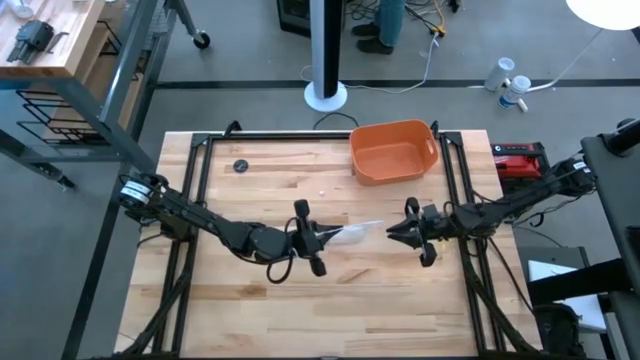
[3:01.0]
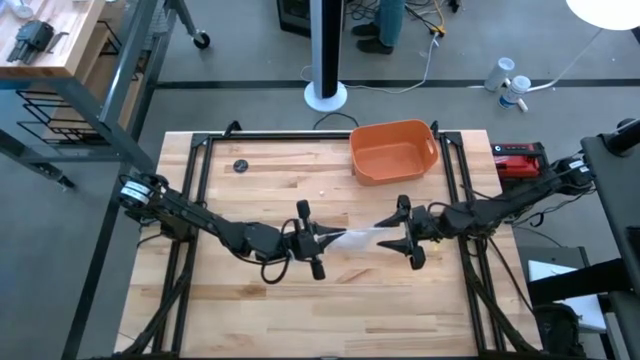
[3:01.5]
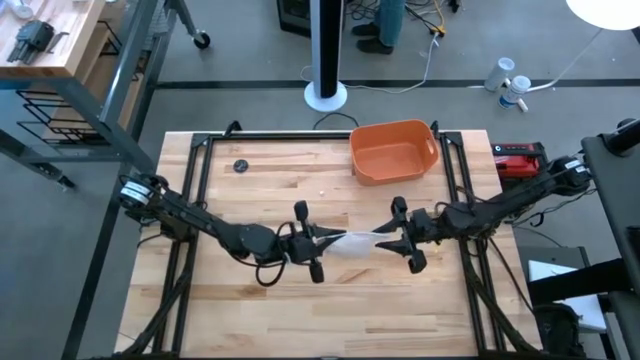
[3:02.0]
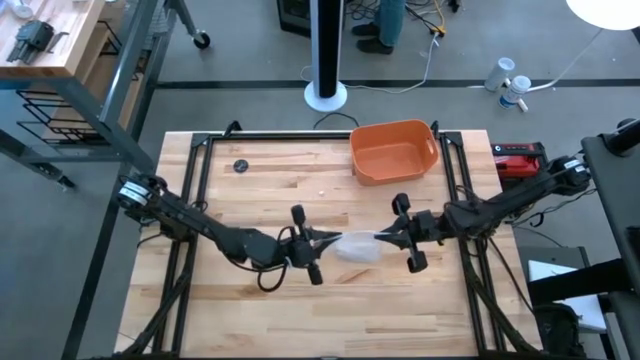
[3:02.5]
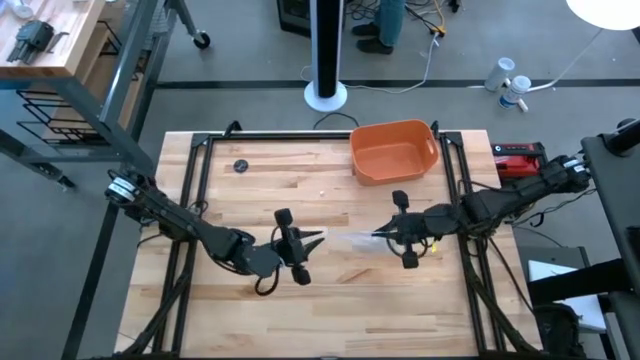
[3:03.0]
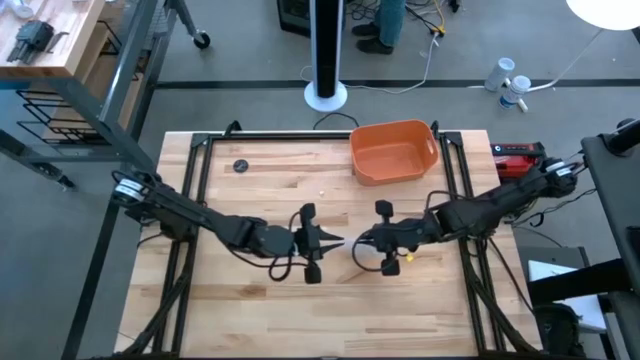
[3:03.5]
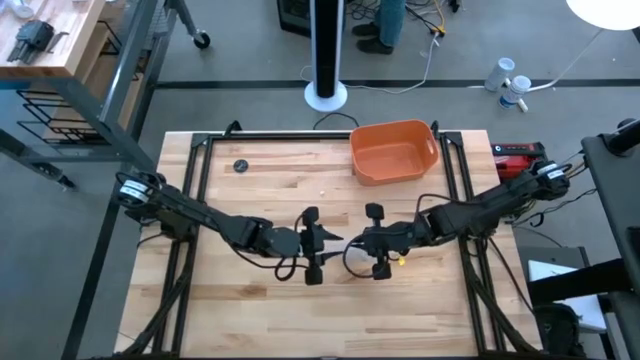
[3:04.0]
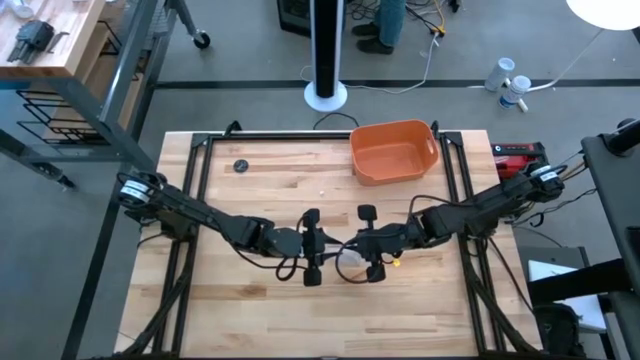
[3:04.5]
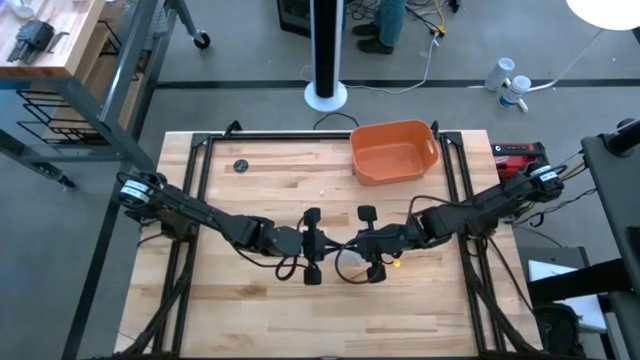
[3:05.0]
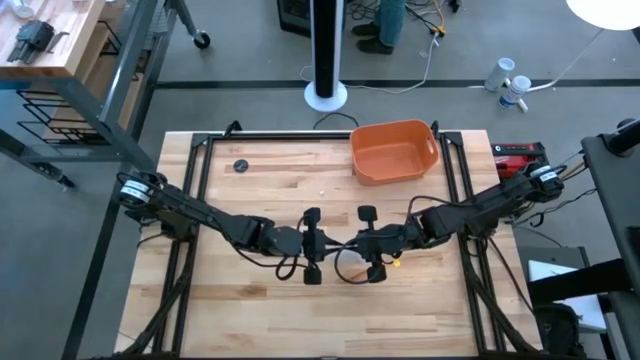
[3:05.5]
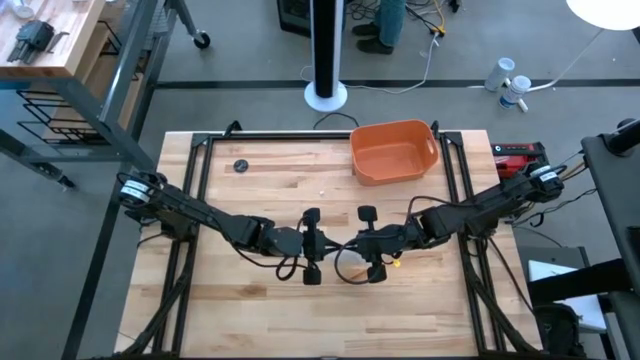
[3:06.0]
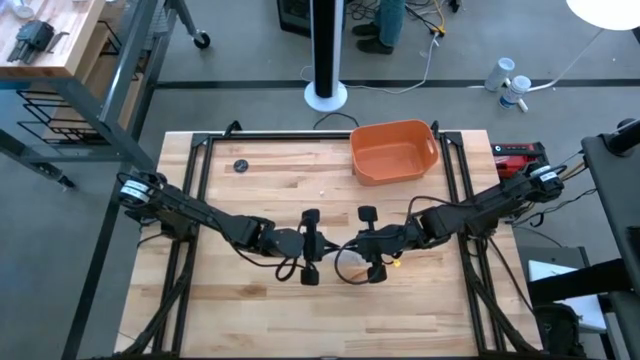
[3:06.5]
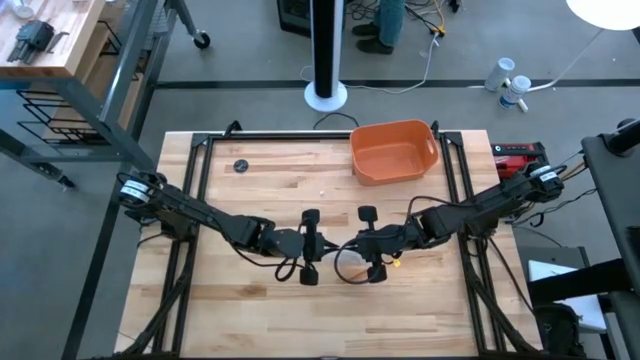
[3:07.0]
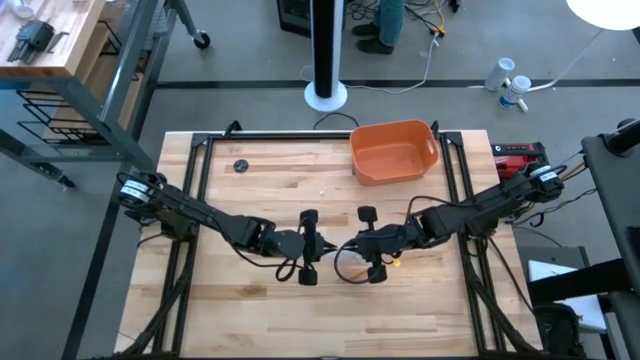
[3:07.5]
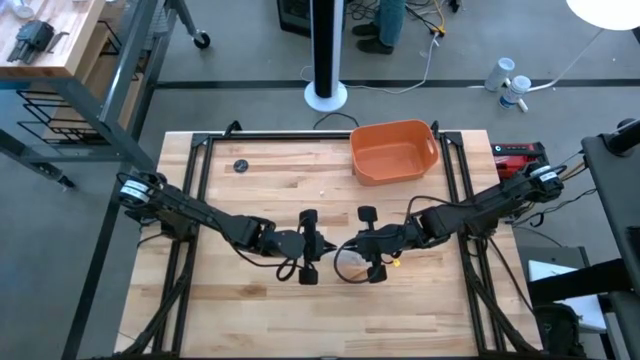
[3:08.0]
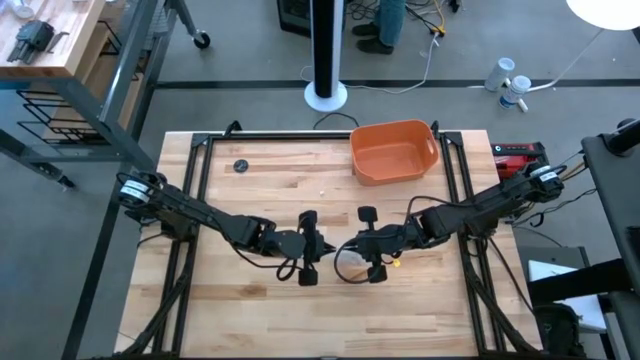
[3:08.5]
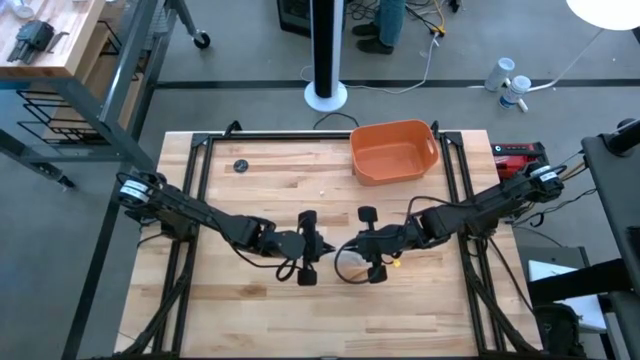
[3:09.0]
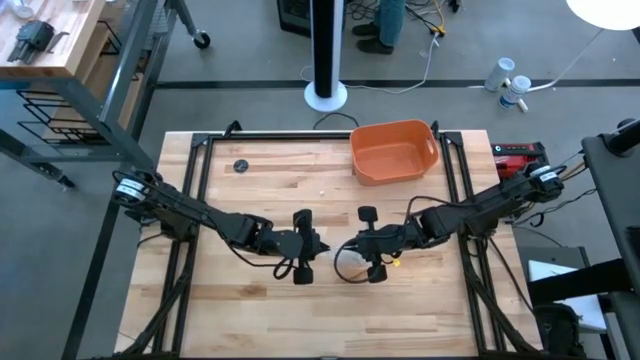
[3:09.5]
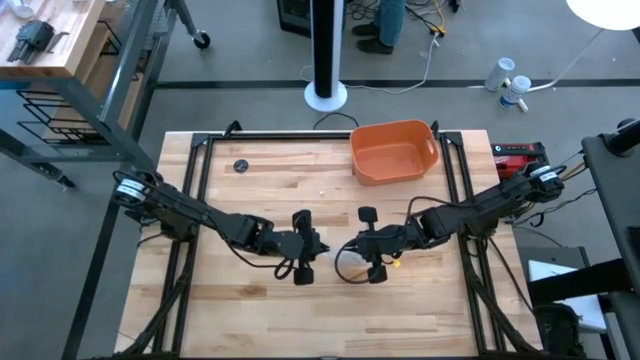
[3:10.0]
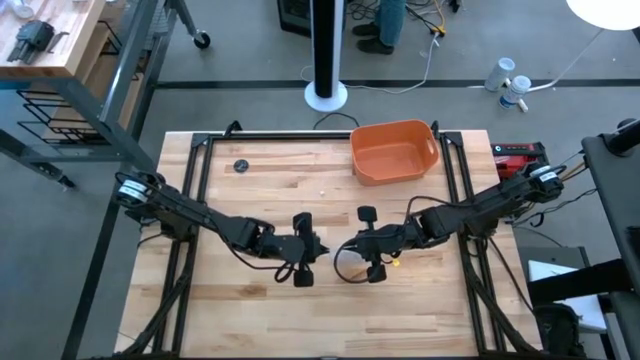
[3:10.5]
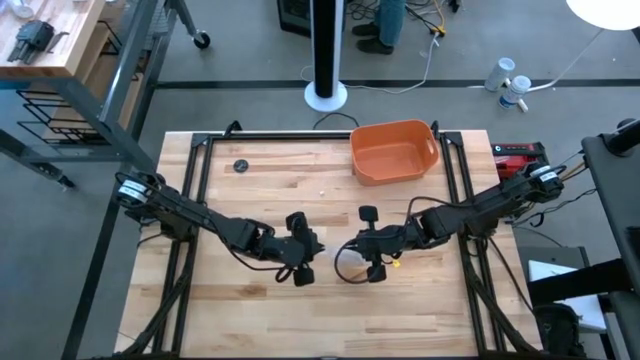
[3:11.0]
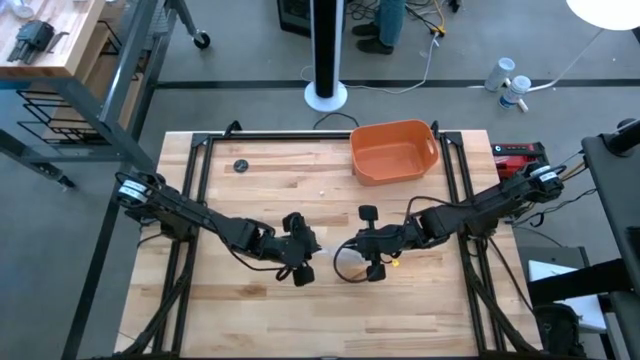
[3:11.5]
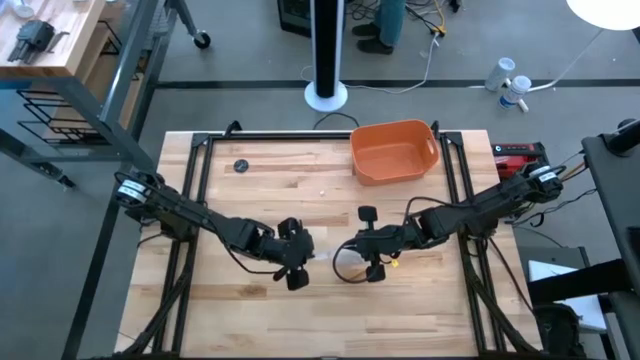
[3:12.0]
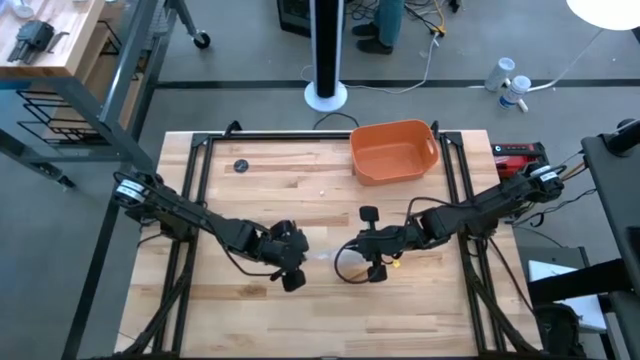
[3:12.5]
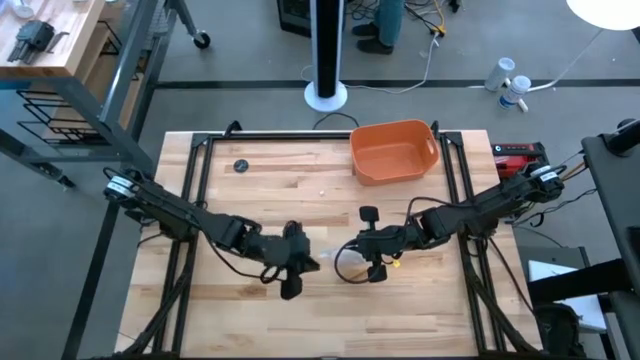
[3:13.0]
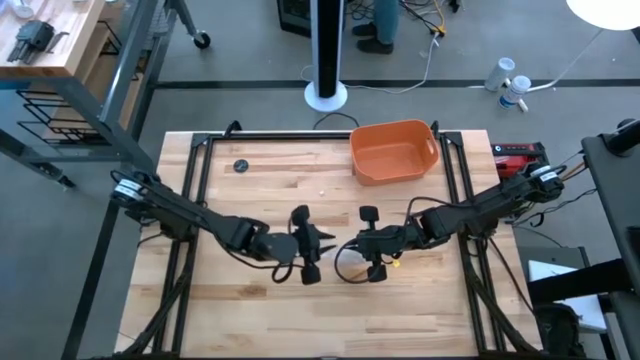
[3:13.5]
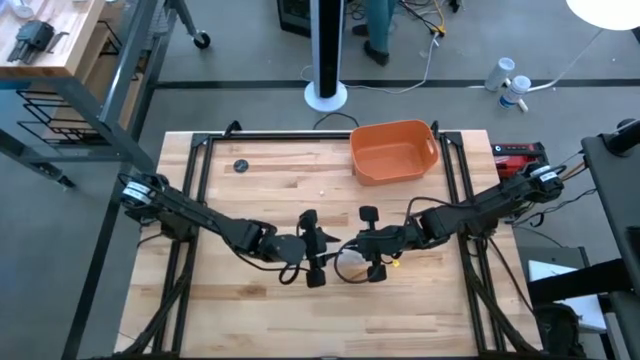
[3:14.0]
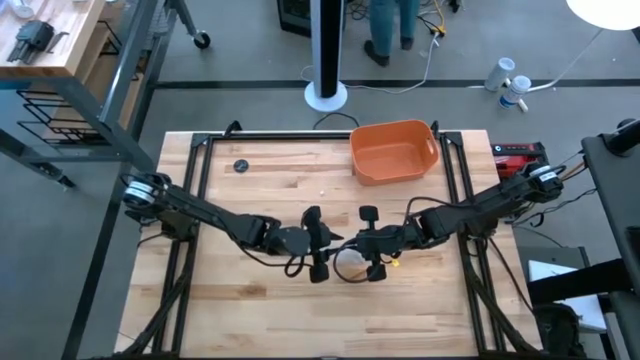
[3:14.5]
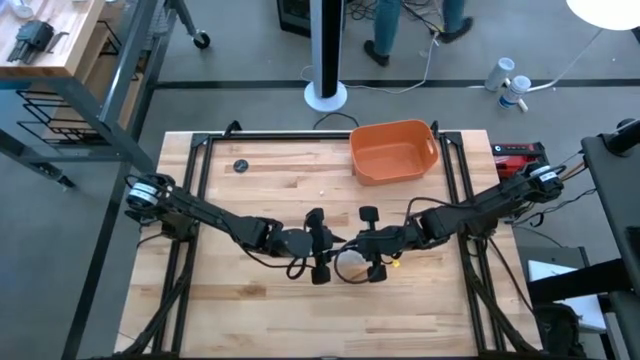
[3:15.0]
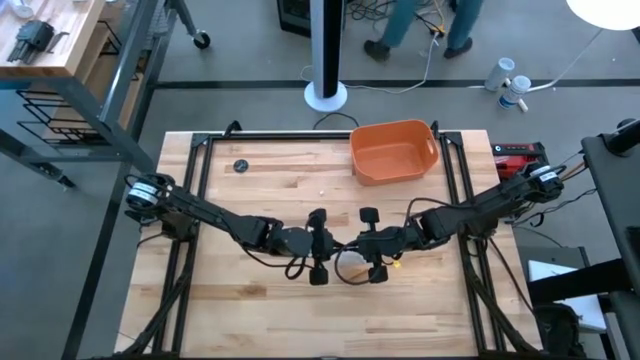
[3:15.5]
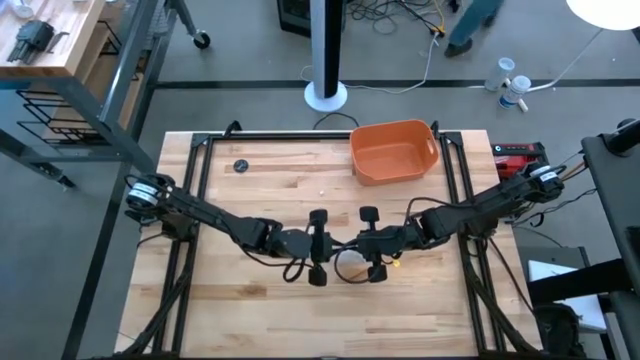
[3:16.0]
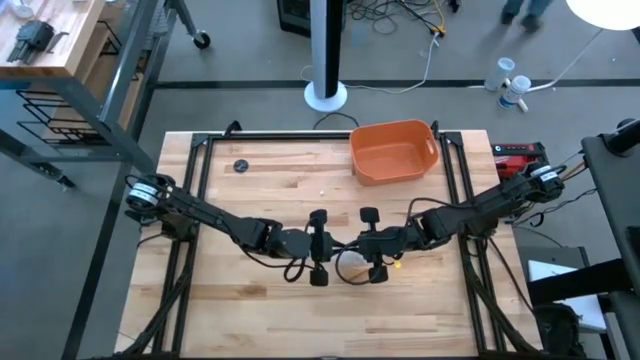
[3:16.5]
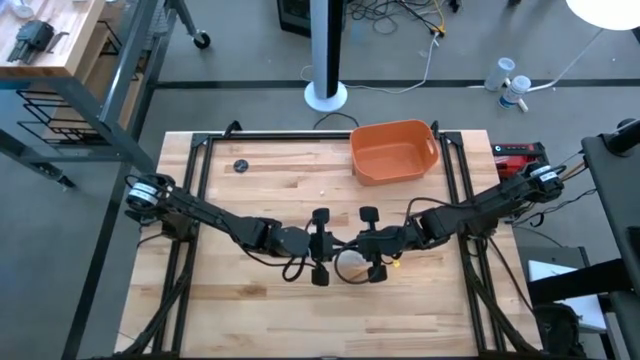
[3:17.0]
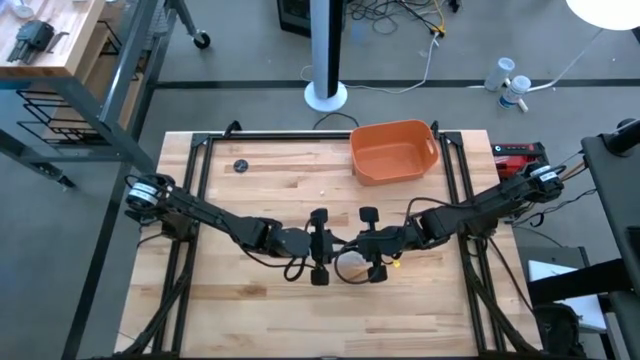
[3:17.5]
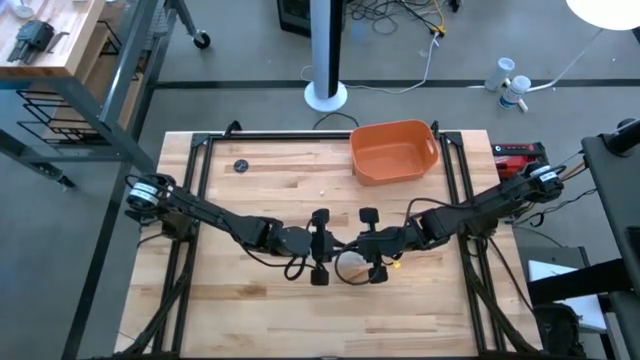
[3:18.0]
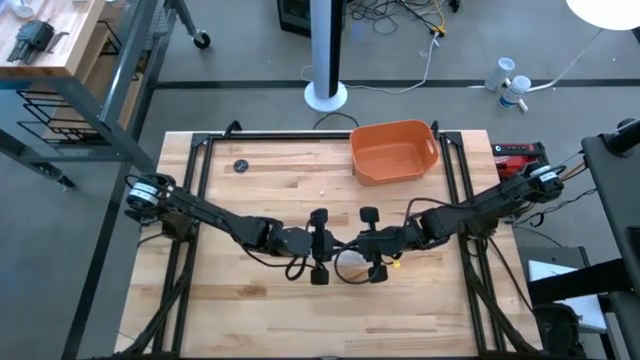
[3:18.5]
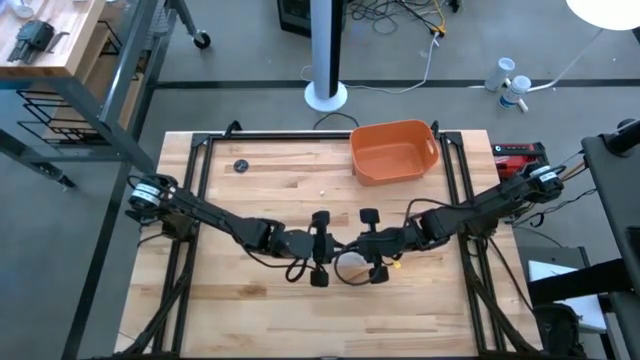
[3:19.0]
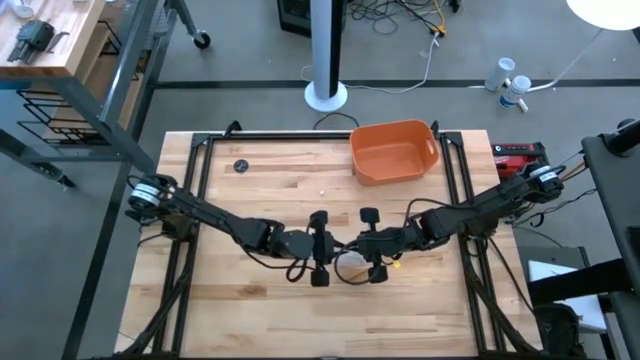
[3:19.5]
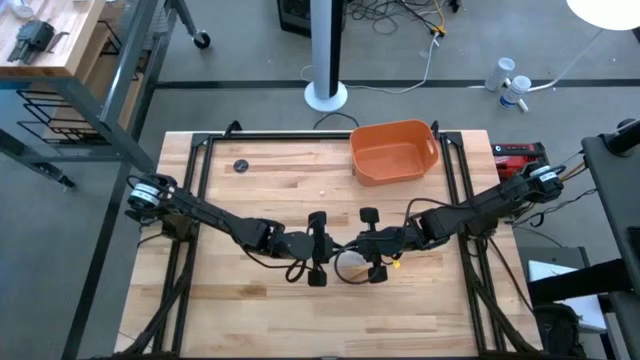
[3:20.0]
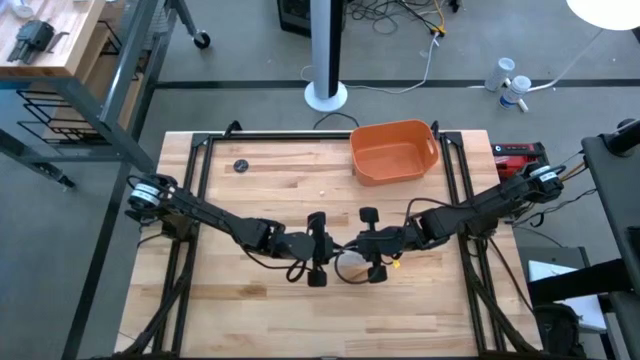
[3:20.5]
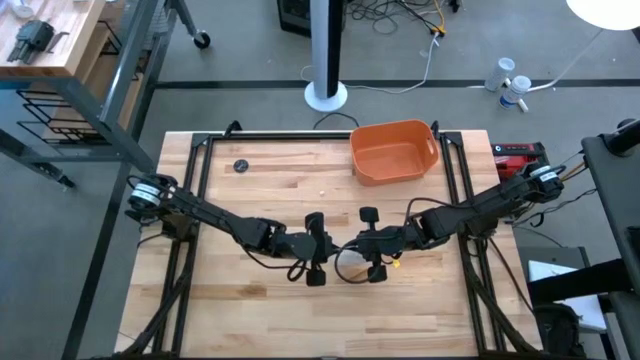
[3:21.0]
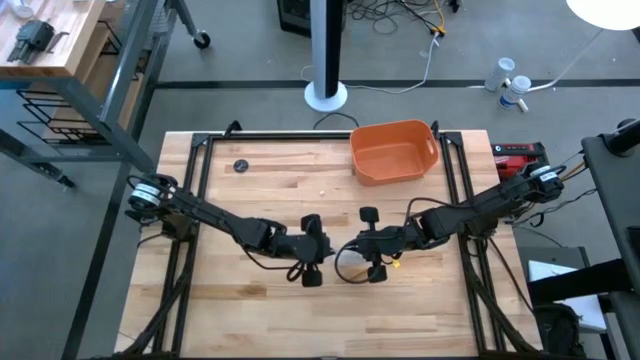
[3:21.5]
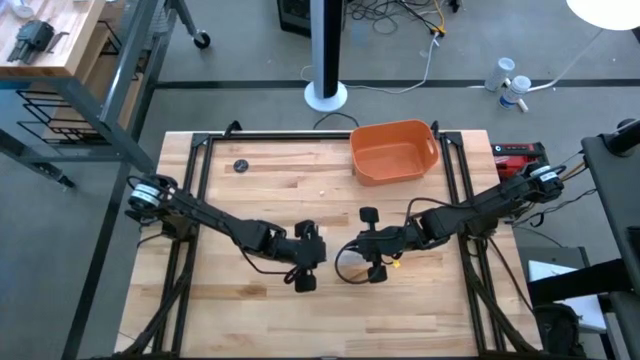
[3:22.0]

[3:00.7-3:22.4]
Task: Roll bandage
Close the transparent zip bag
